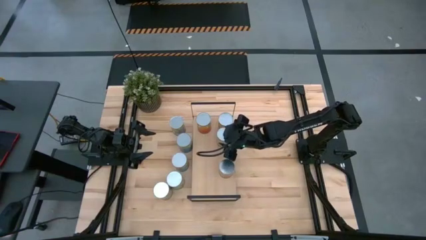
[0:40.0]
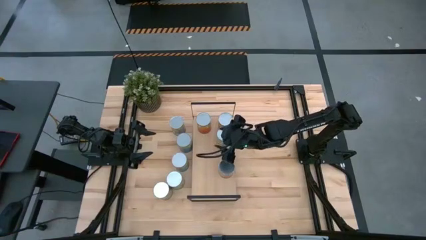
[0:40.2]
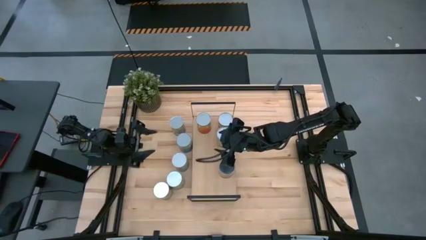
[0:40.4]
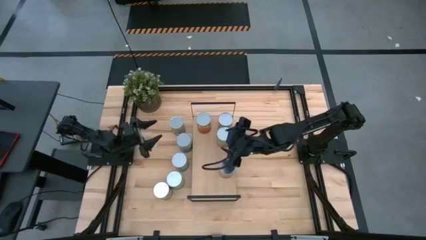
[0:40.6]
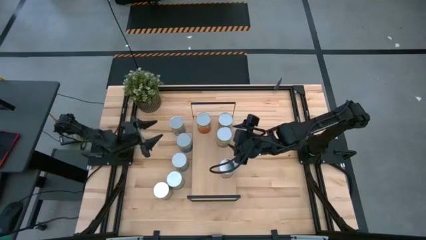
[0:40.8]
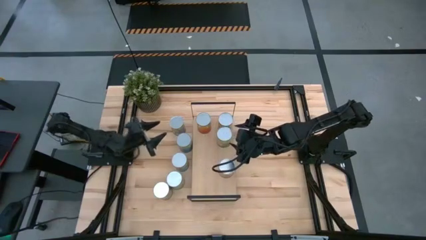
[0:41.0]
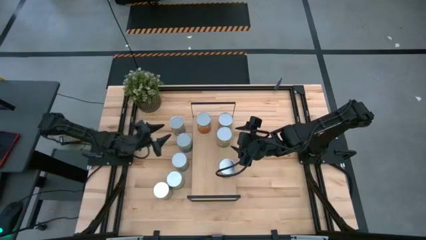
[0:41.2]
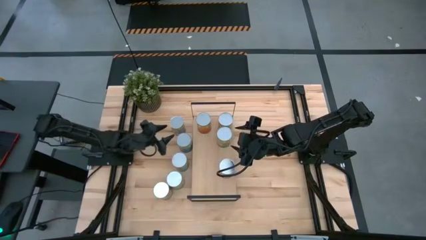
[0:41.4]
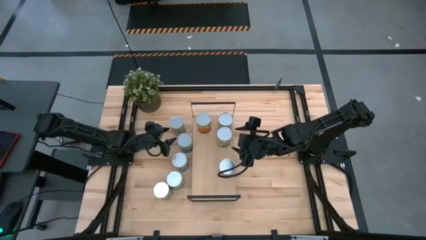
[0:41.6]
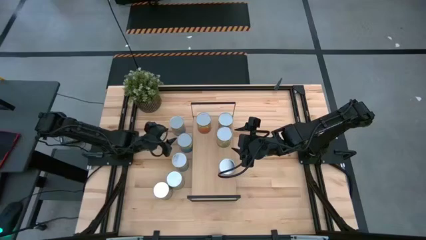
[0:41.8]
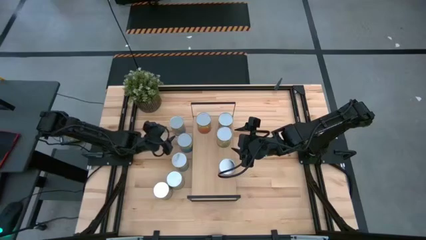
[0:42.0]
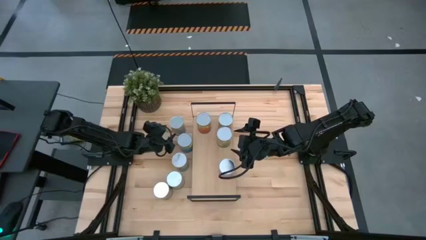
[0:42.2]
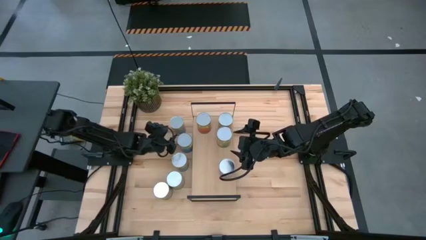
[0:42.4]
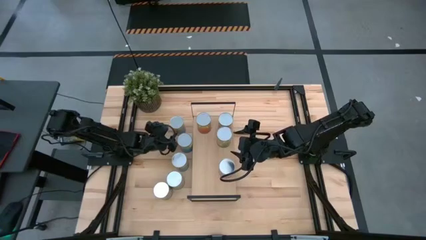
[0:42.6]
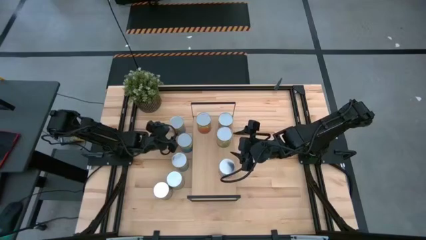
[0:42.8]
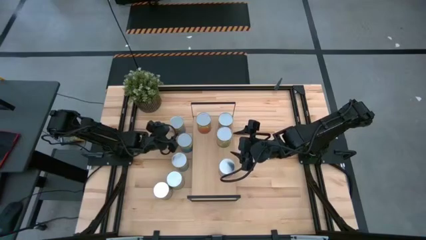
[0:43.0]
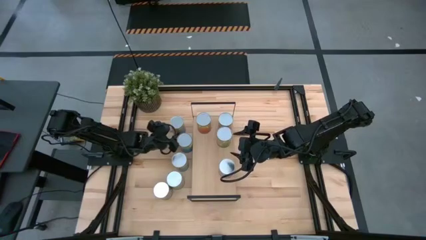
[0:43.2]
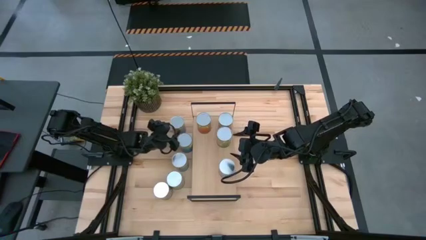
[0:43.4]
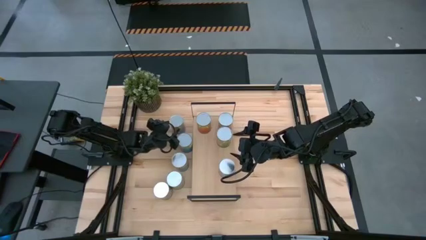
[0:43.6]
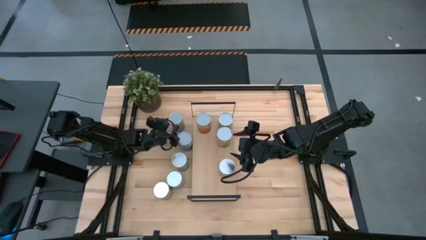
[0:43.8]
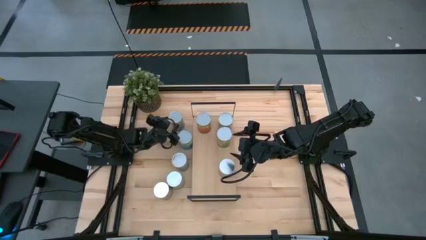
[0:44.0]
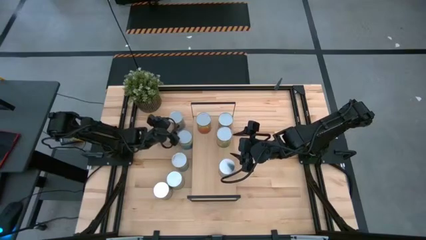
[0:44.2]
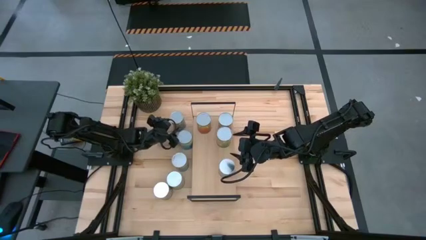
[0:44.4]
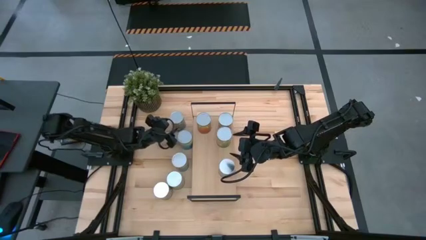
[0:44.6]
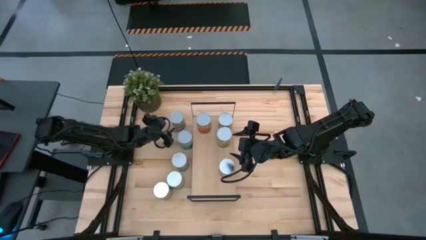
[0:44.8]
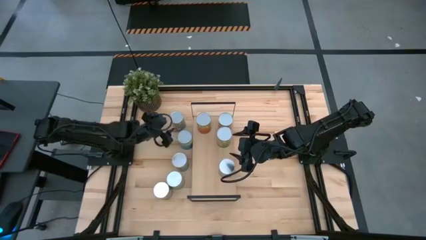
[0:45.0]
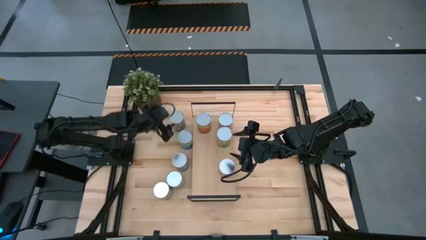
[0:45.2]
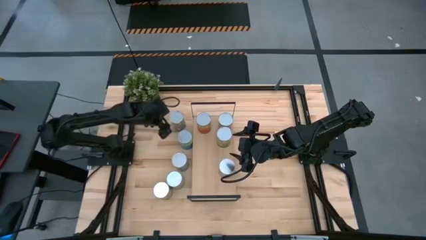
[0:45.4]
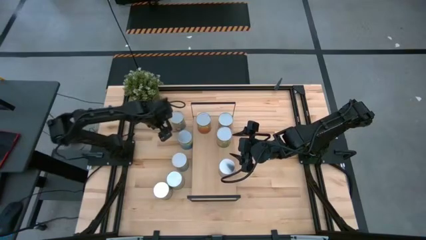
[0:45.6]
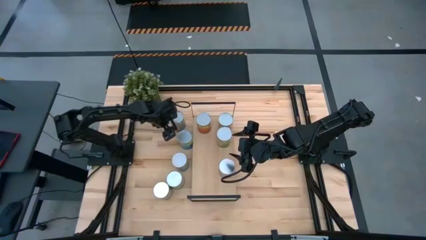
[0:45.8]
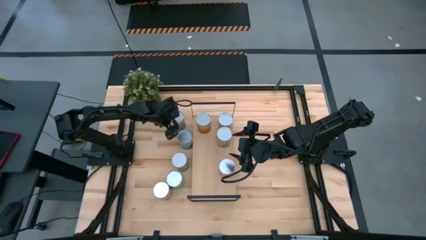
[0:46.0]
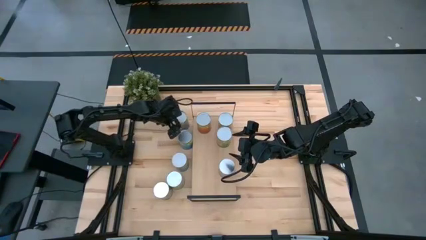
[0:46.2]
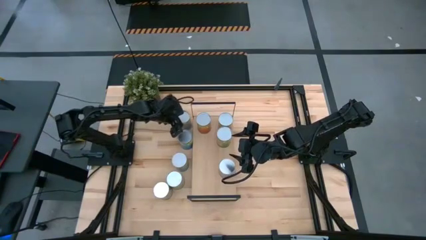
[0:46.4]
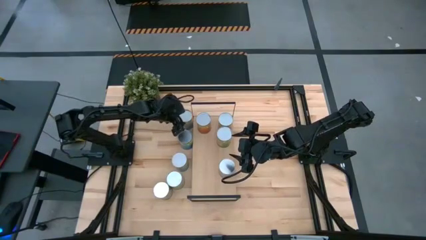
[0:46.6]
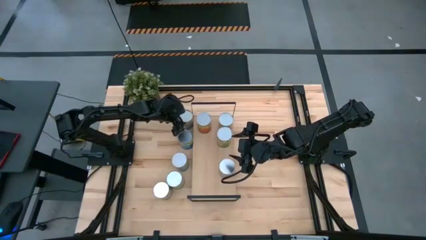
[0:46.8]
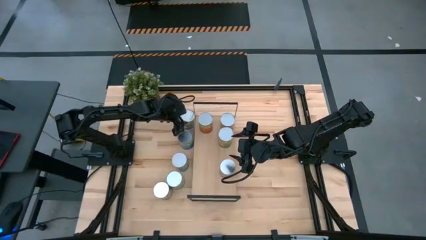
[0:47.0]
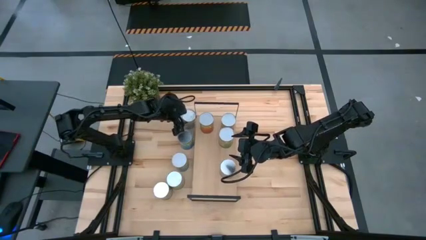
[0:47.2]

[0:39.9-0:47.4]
Task: Pick and place cans onto a shelf
Put the canned peaches on the shelf

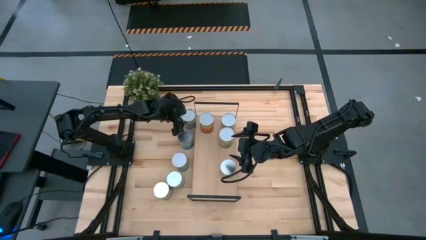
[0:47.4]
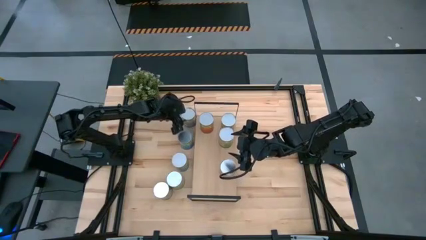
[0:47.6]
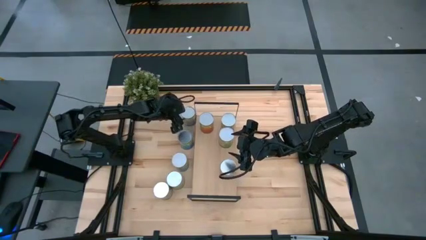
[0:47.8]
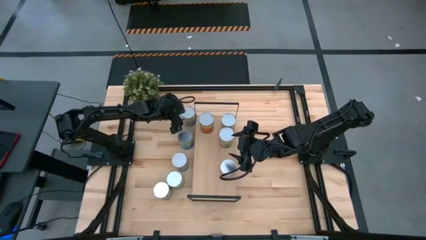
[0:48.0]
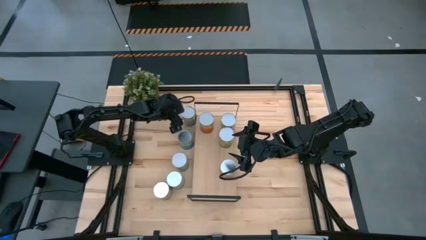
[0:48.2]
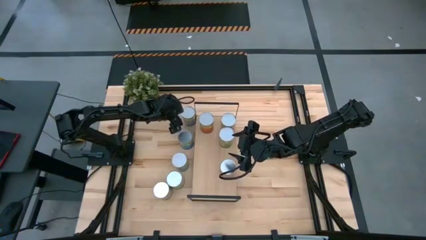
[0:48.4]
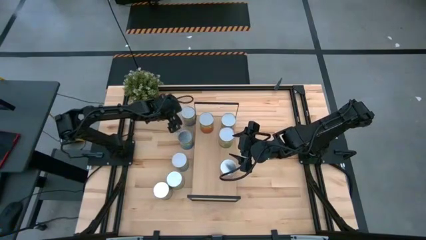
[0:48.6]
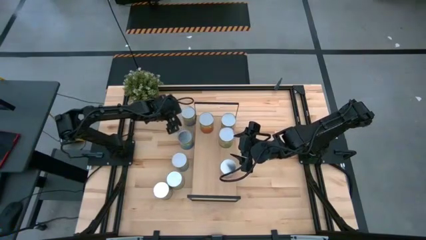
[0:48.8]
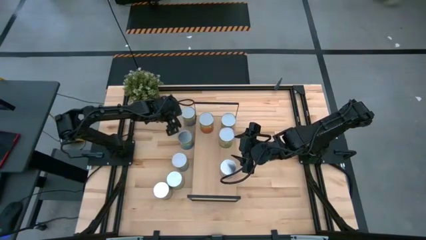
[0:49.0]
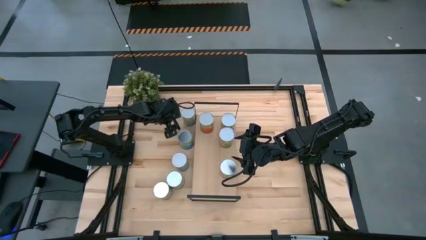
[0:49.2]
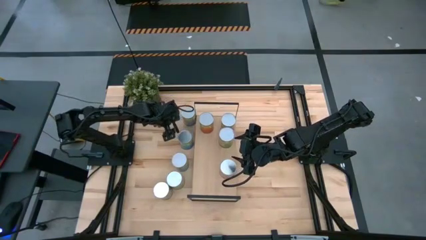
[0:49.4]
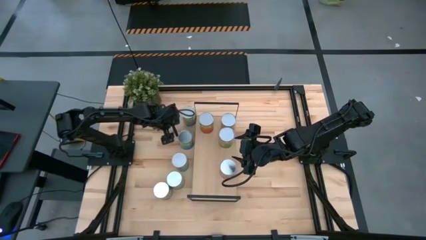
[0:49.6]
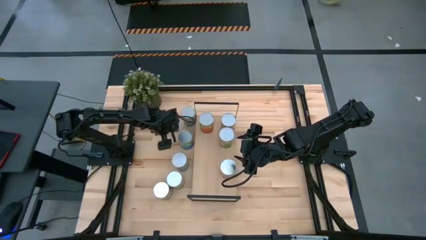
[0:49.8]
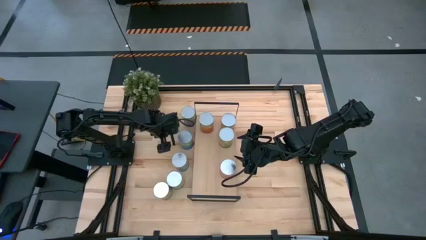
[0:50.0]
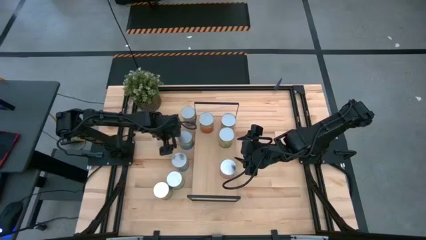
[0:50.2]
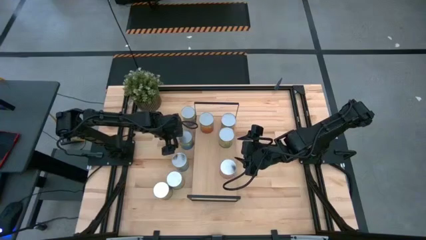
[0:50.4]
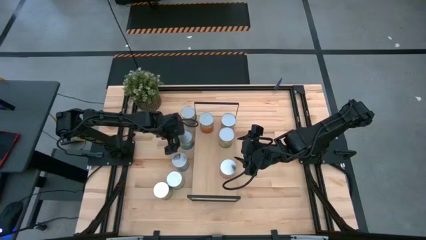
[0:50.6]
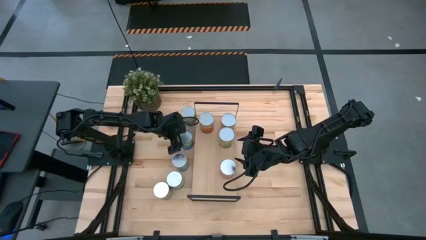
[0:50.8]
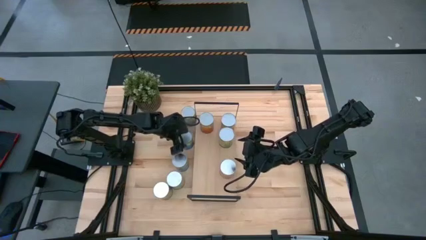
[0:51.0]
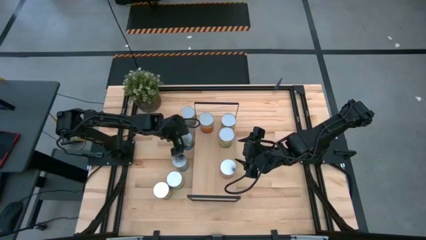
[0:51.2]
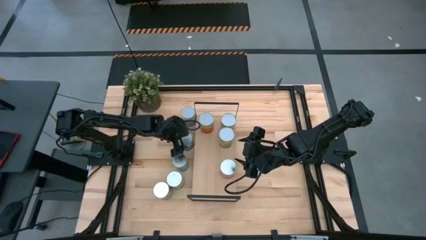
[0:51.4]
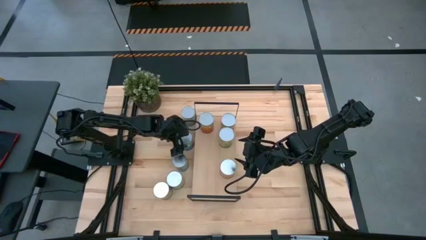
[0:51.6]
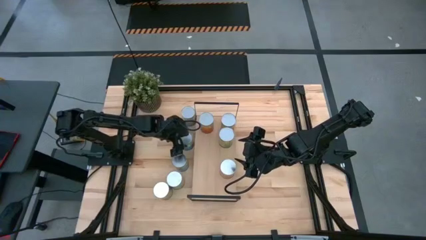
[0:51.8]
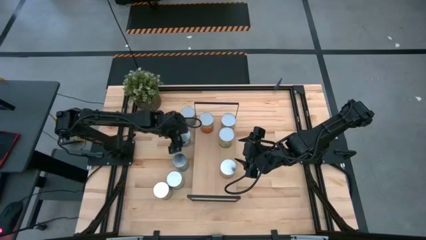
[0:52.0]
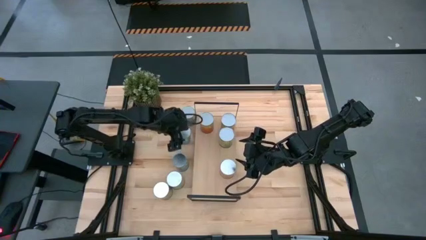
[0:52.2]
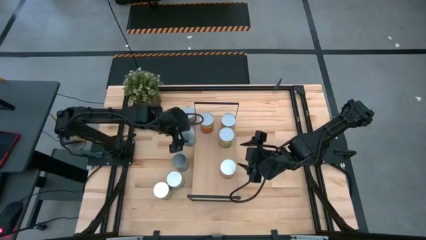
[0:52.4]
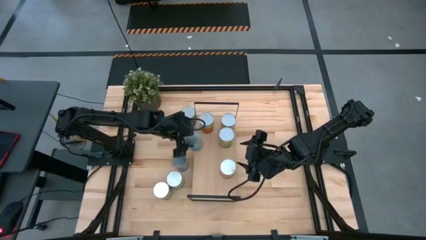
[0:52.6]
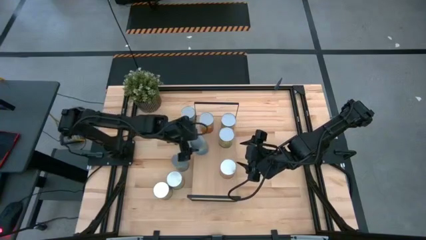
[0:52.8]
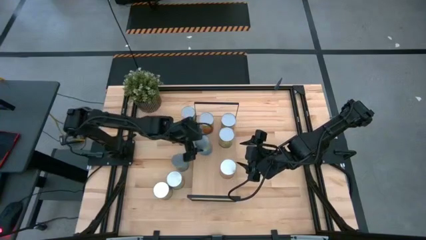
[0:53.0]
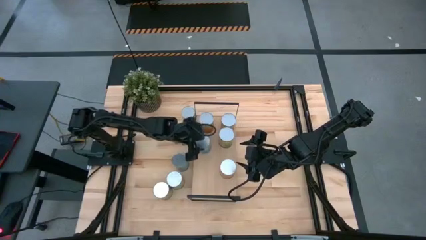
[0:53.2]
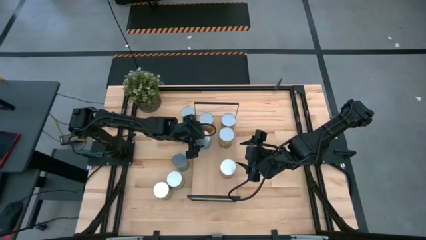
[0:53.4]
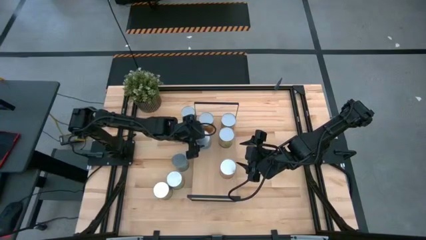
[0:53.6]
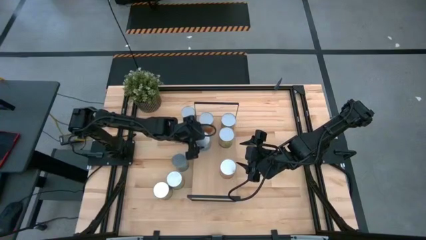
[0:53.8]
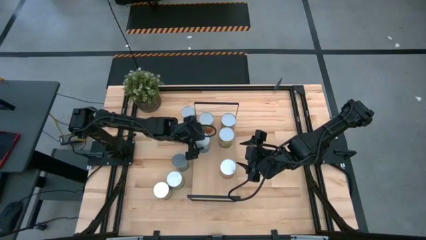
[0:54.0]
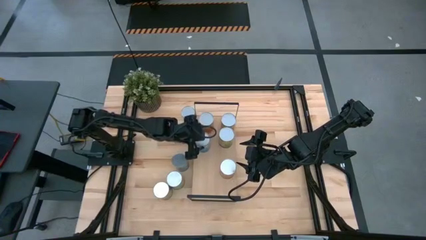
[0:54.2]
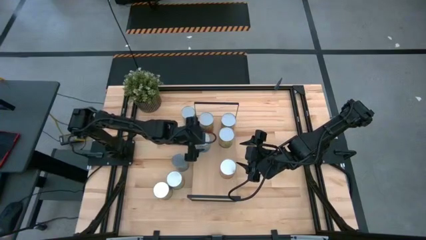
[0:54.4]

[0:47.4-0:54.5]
Put the canned cherries on the shelf

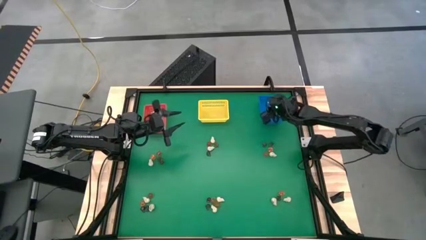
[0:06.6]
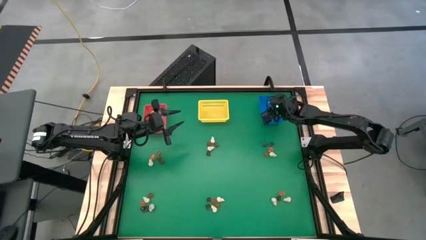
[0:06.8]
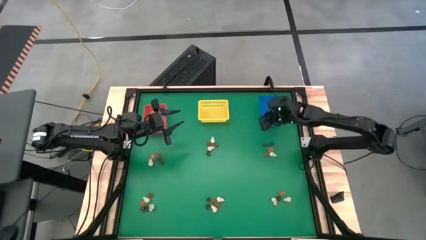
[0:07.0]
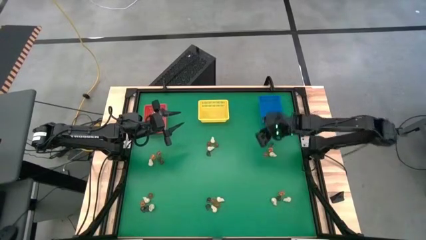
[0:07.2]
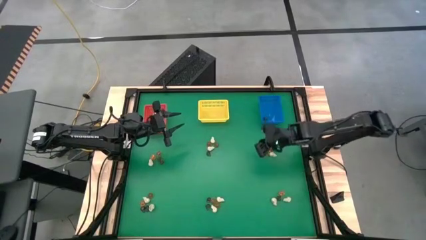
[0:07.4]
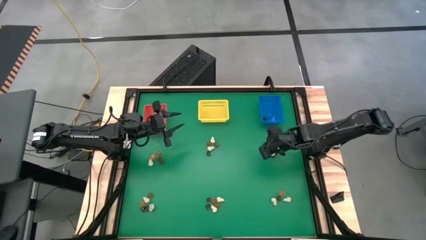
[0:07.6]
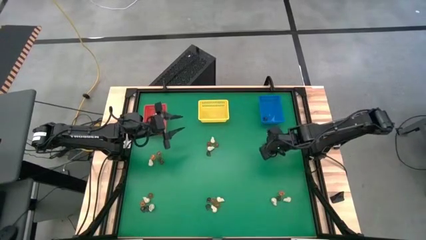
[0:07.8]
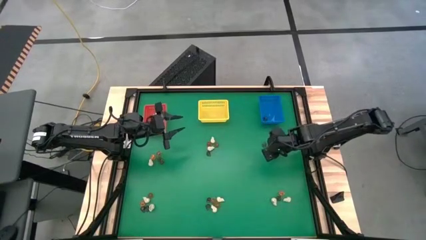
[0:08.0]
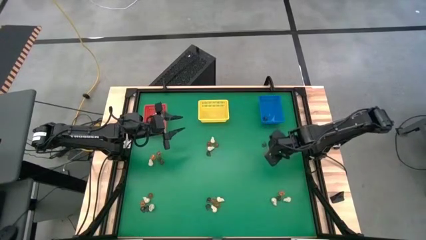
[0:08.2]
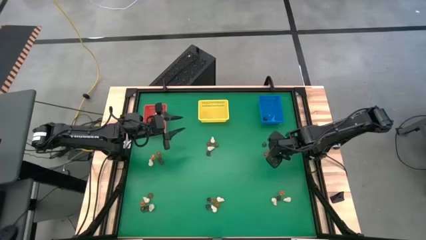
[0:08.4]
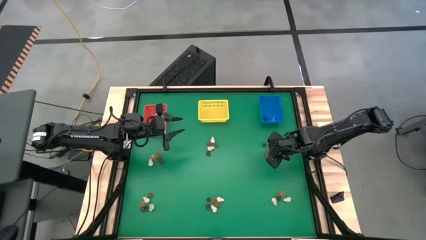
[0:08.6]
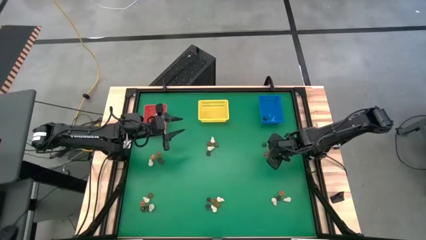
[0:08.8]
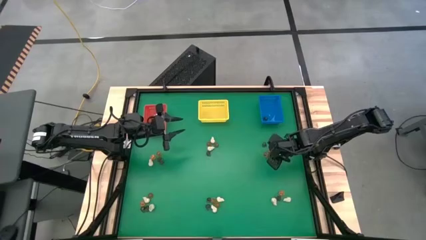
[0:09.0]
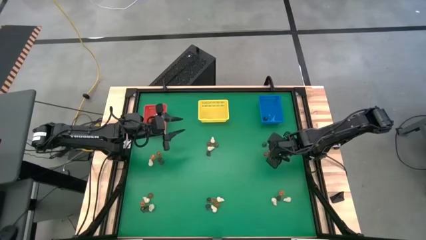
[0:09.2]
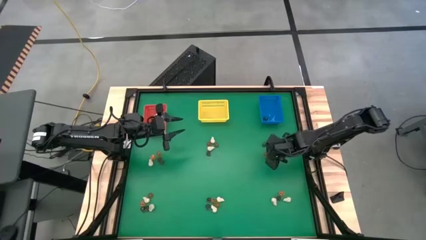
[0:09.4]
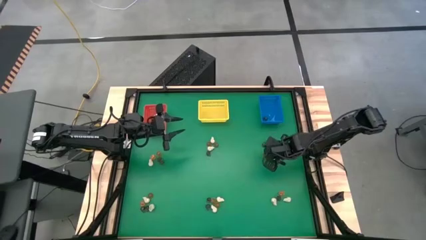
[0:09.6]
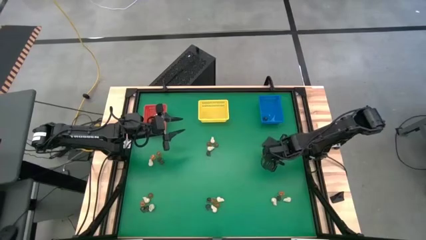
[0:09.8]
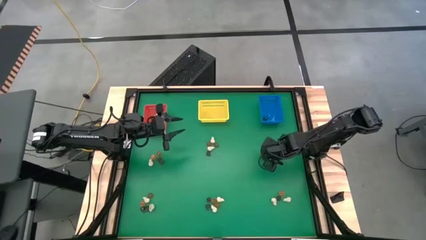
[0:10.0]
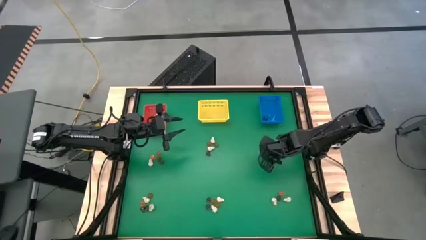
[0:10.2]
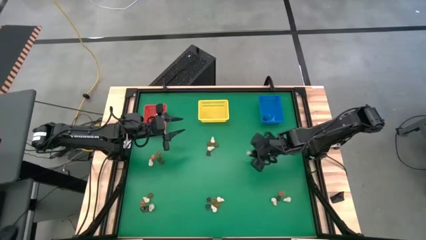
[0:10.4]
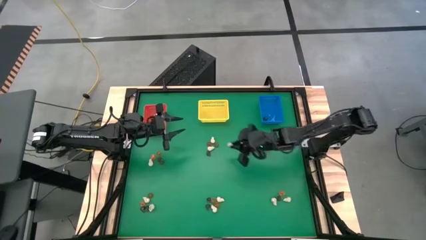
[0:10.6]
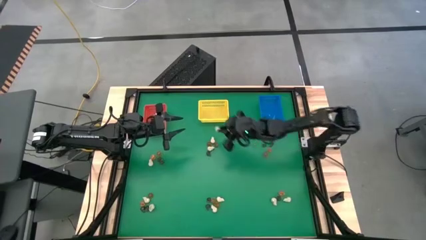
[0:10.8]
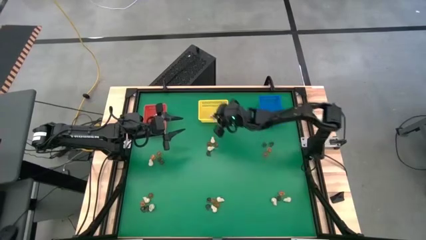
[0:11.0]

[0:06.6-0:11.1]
Task: Sort Halloween decoration
Put the white skull toy into the yellow bin
